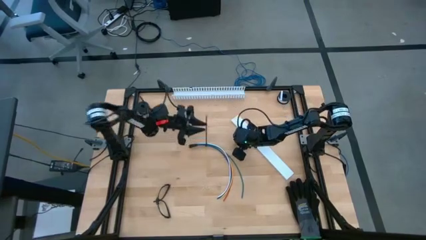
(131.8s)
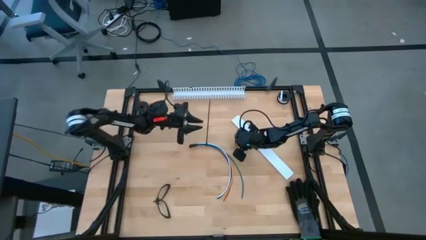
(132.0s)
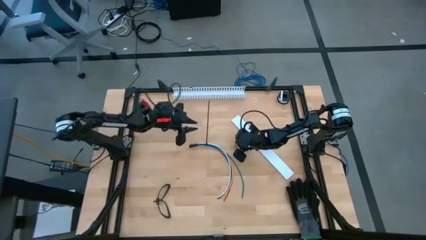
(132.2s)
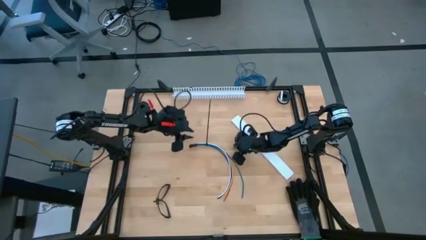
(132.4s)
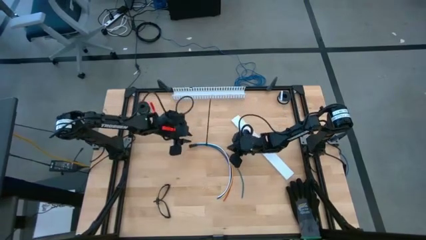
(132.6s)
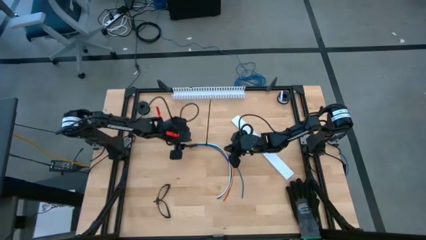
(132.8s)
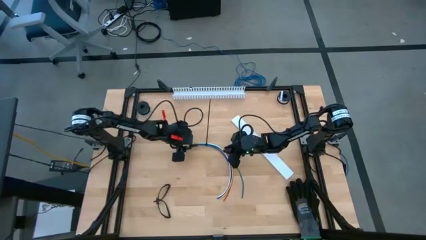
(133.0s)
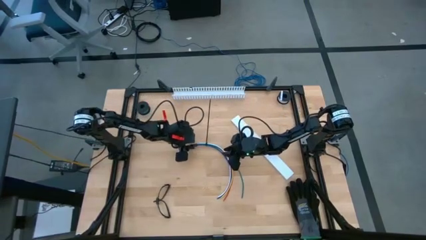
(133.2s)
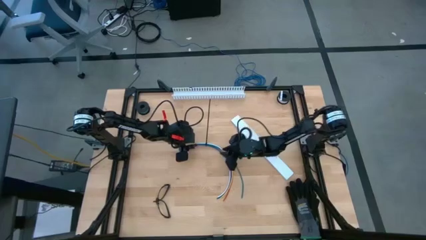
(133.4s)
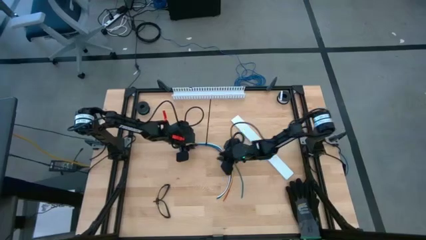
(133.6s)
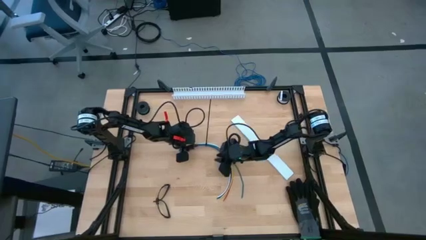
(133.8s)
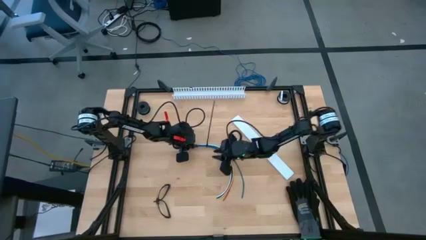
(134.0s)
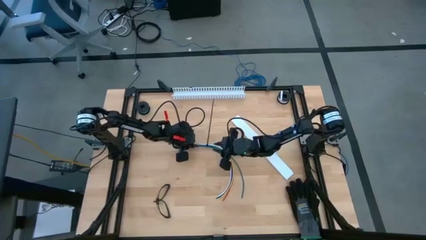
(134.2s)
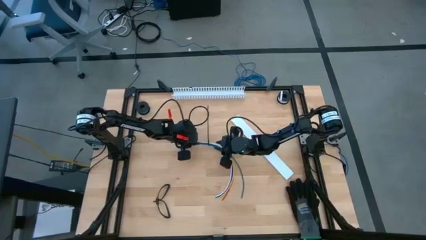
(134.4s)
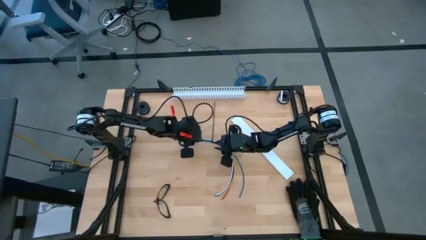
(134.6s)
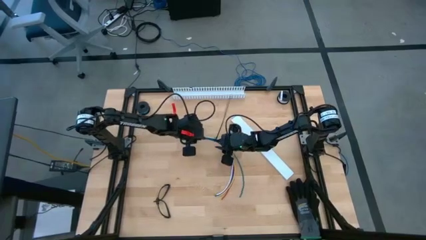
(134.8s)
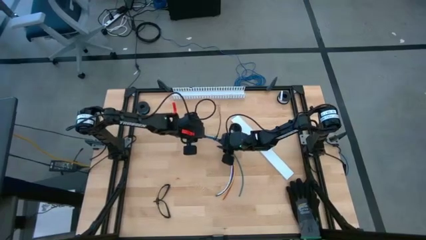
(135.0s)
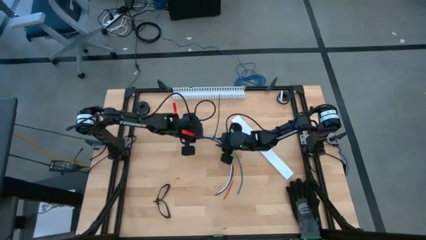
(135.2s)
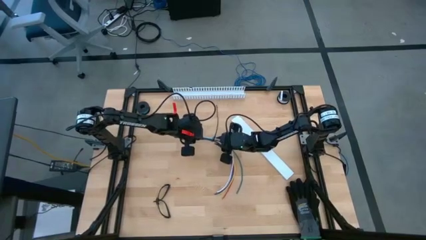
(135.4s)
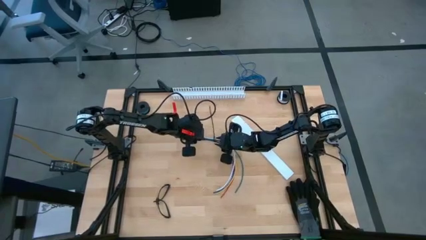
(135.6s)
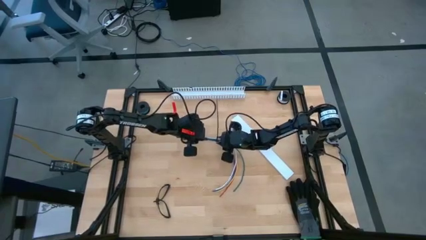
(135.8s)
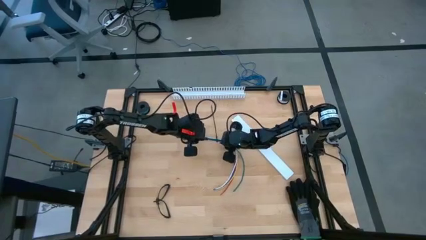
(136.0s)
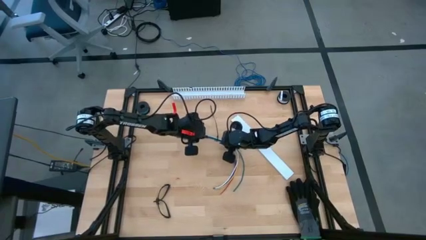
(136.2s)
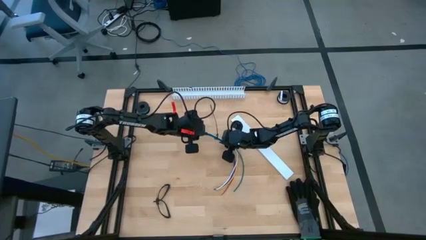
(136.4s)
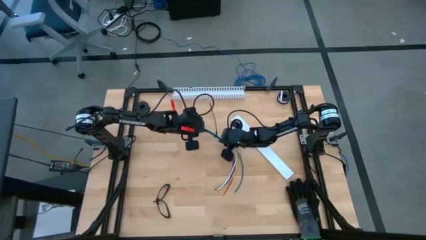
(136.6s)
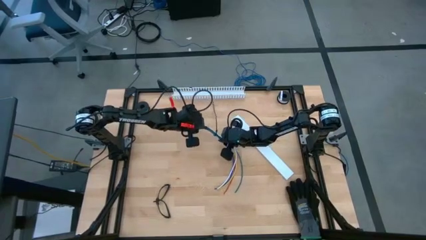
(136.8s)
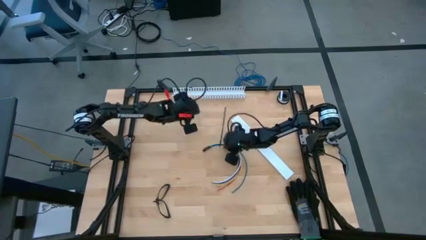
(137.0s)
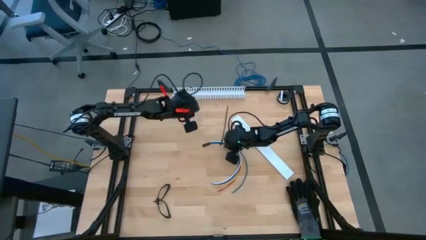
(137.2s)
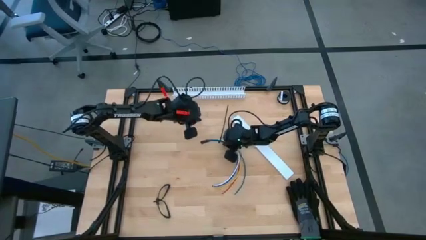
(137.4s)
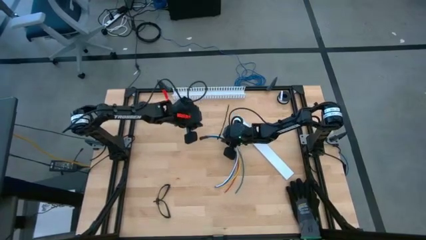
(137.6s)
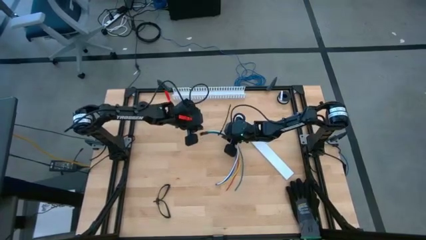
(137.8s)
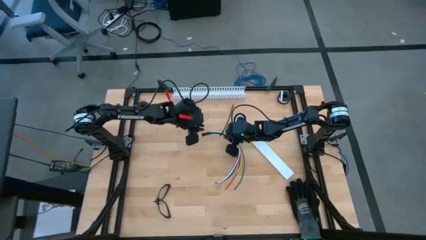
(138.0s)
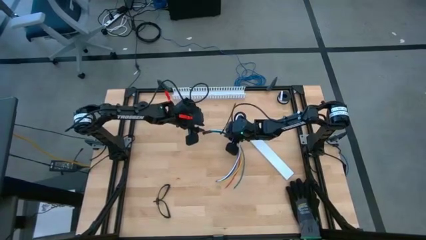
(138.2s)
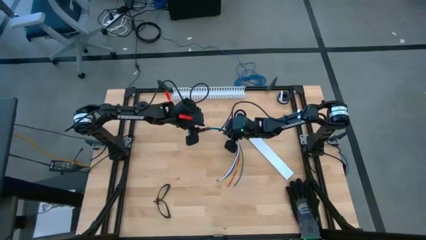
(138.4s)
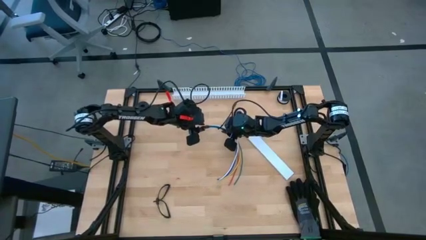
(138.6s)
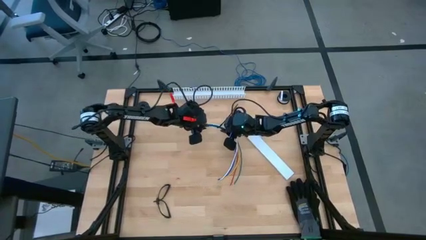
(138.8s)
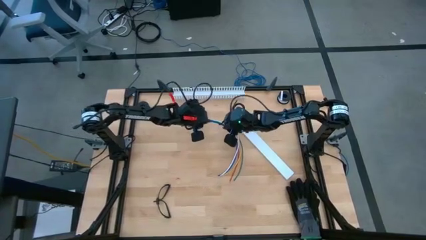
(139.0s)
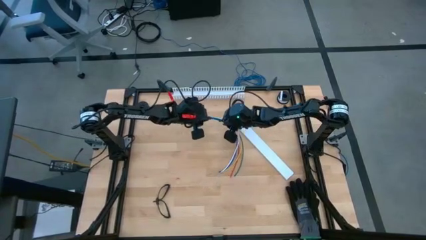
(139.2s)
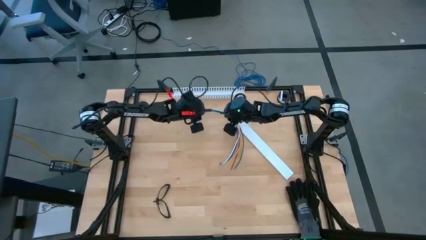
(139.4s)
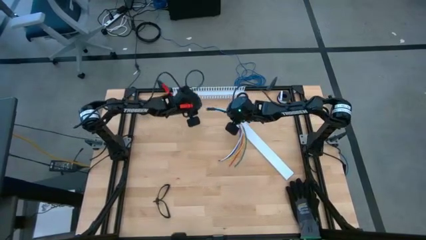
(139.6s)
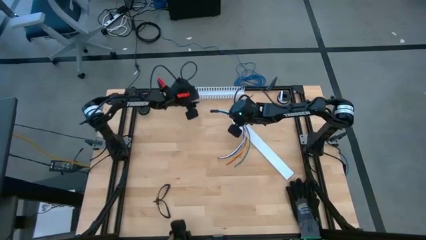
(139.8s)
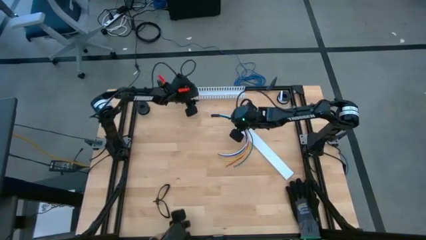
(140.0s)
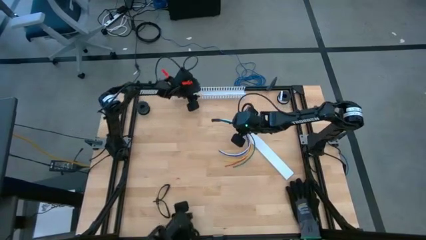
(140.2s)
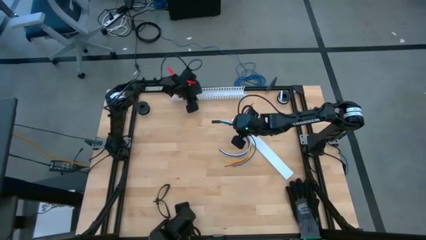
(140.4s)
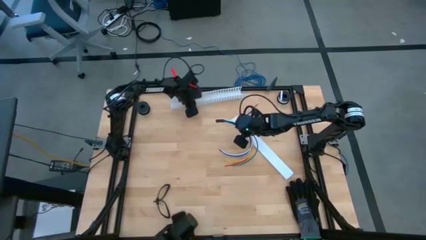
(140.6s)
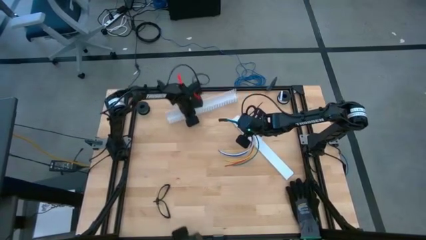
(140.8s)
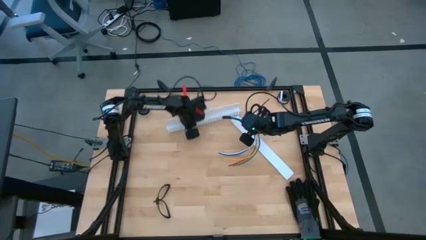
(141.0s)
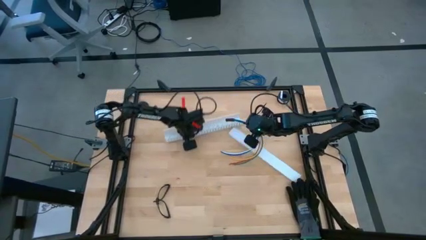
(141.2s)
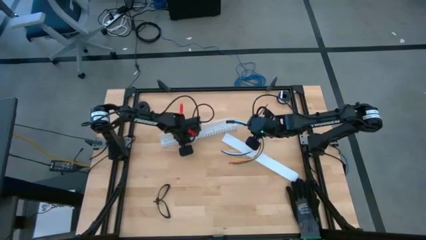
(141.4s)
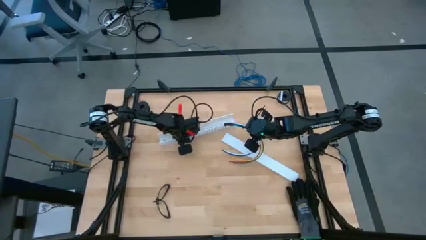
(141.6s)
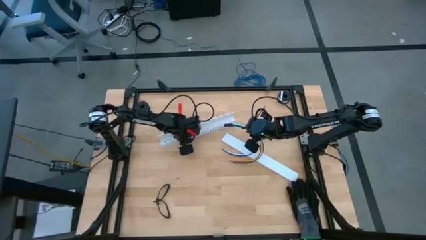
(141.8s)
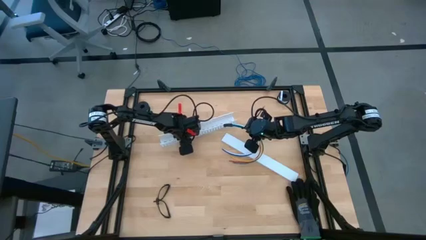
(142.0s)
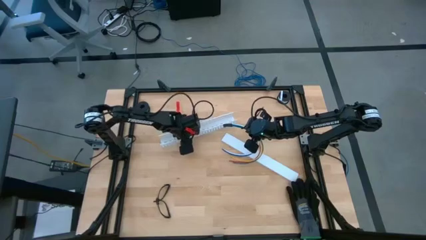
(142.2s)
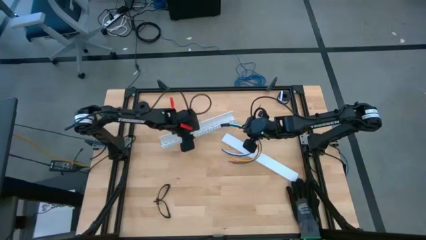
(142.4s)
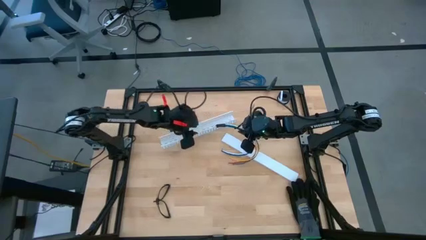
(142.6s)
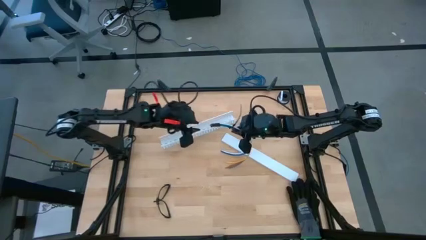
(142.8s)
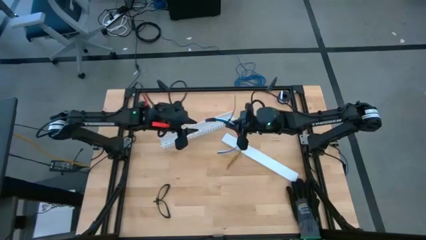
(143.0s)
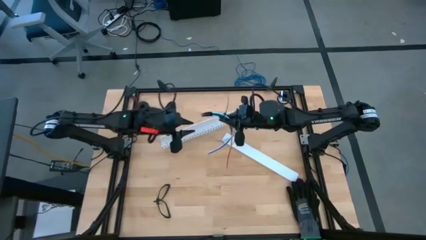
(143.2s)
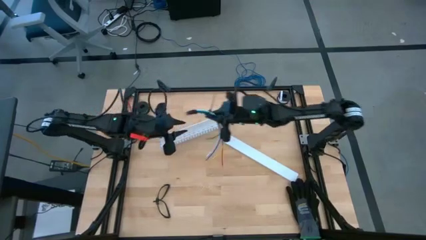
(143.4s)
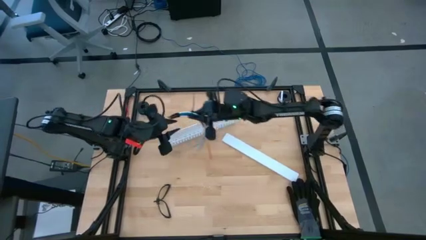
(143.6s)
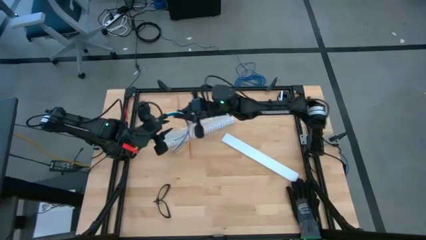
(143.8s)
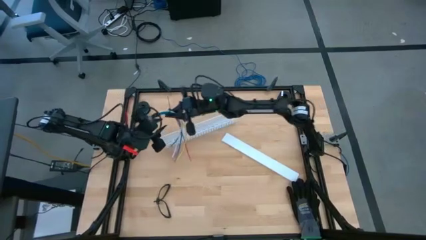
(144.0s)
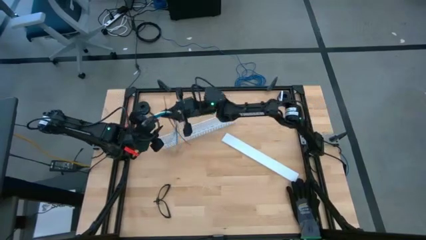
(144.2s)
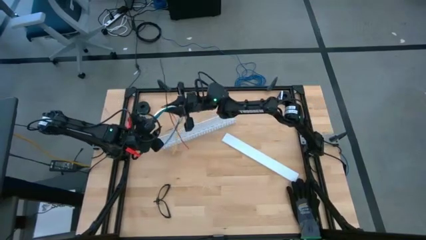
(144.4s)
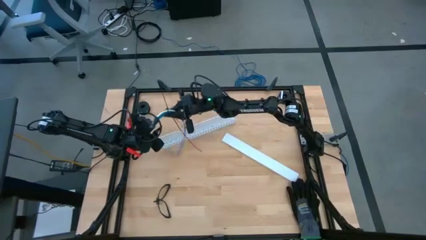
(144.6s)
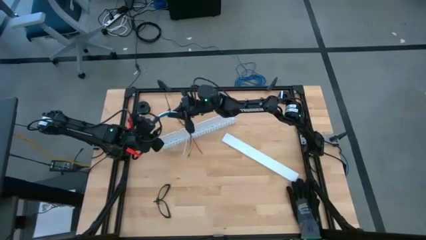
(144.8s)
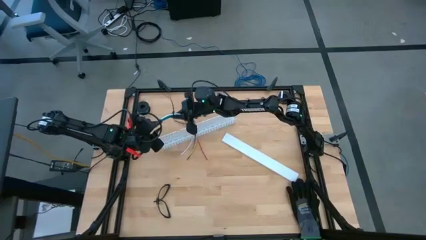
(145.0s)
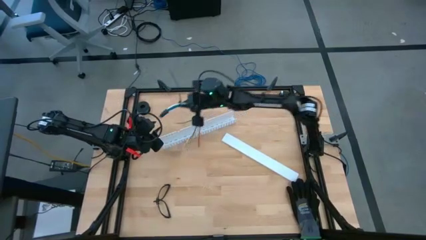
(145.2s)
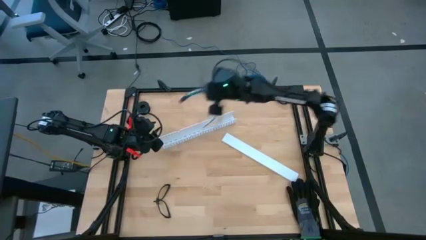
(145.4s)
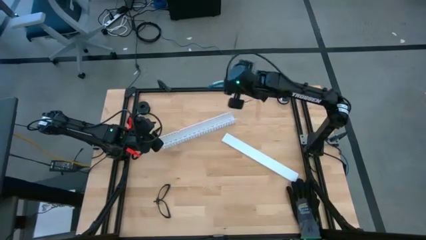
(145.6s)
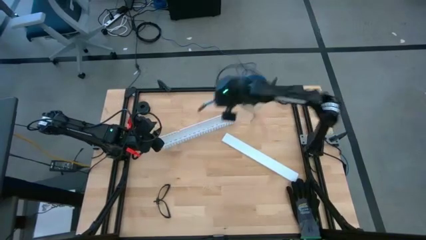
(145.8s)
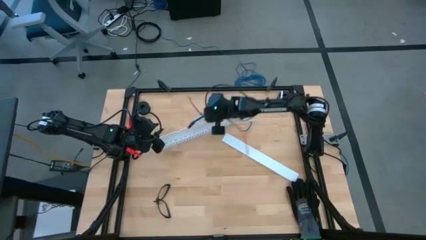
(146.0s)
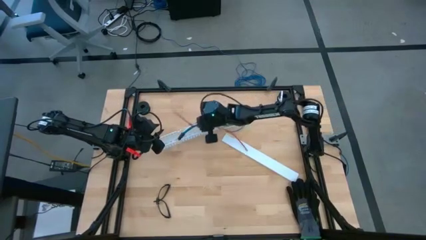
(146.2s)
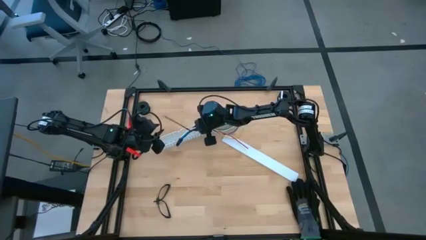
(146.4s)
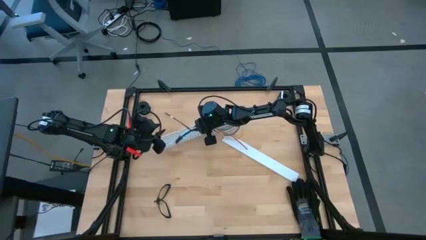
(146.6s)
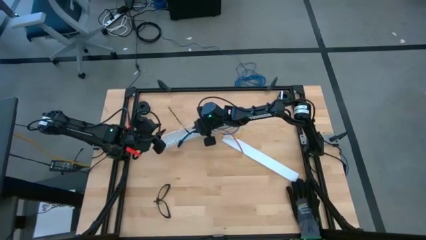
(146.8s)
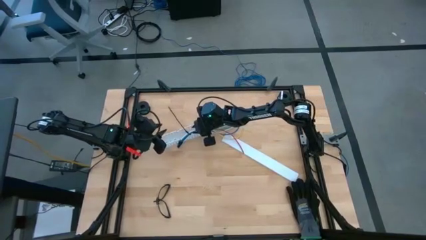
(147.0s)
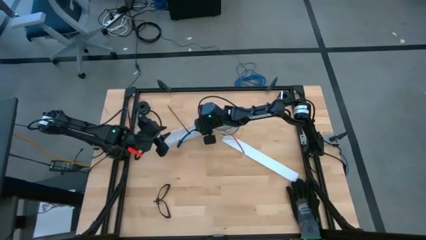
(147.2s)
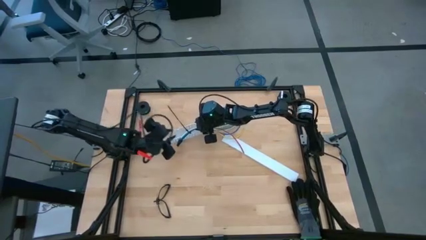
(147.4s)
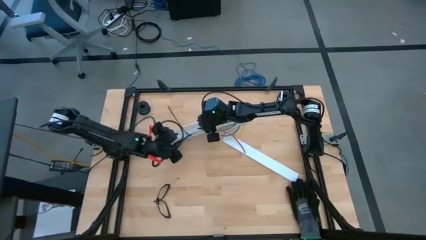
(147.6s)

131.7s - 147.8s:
Task: Ziptie cables
Put the zip-tied cables in the white cable duct
